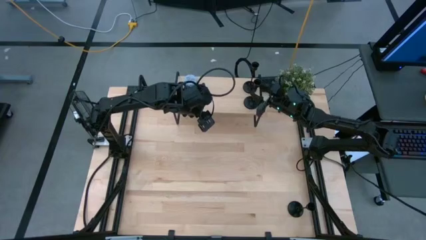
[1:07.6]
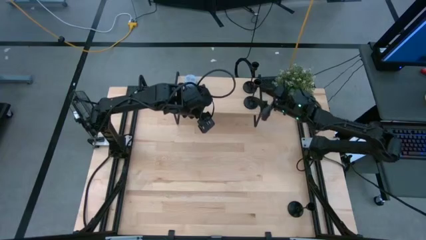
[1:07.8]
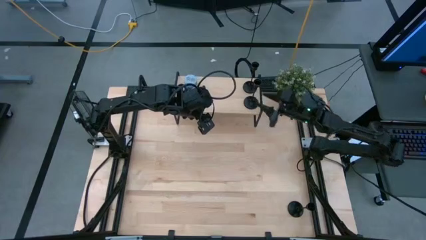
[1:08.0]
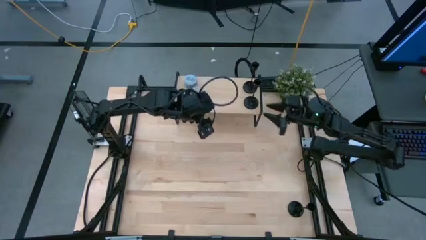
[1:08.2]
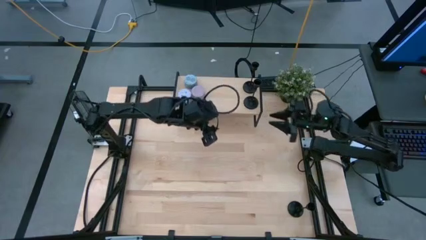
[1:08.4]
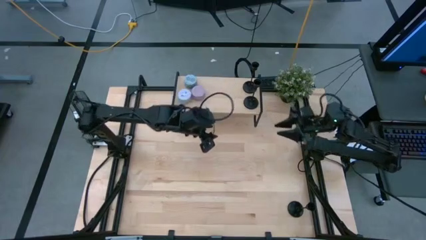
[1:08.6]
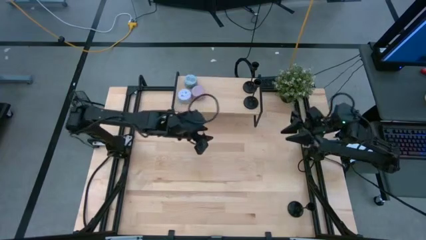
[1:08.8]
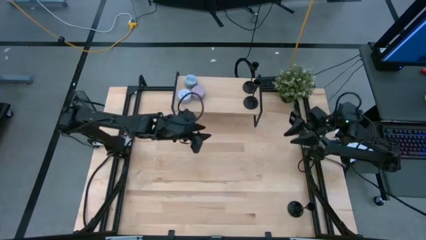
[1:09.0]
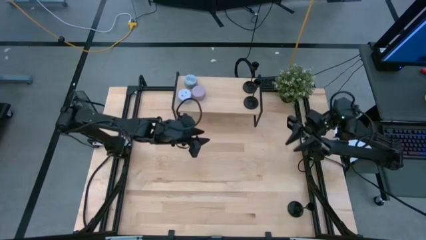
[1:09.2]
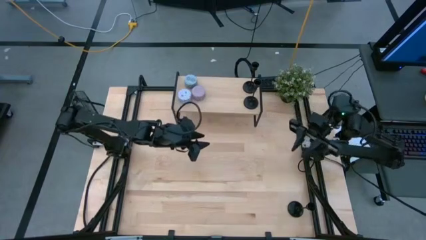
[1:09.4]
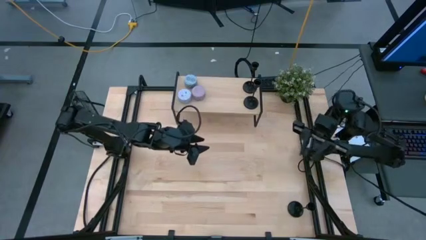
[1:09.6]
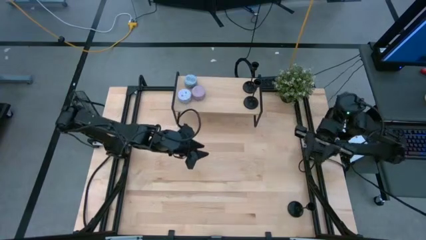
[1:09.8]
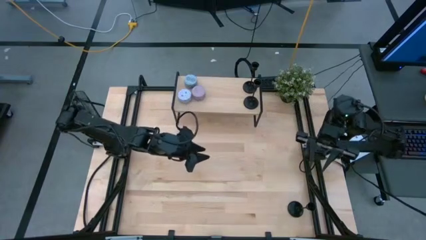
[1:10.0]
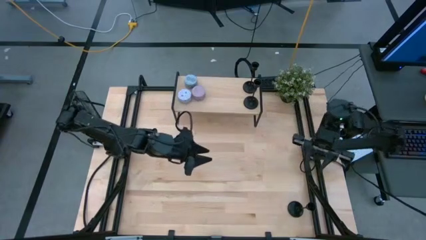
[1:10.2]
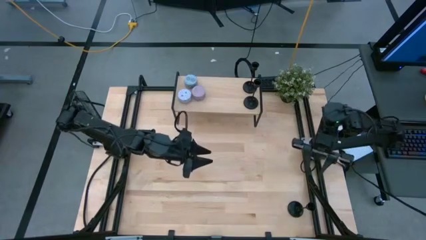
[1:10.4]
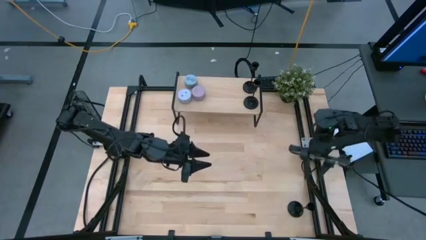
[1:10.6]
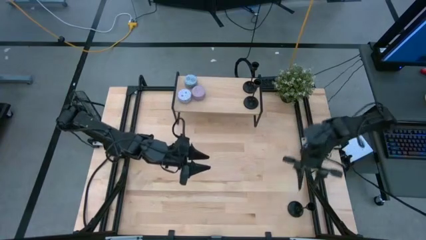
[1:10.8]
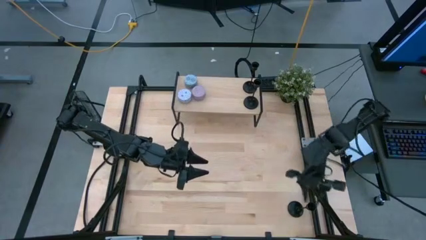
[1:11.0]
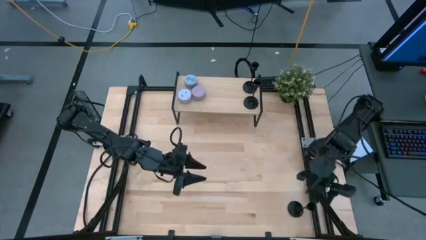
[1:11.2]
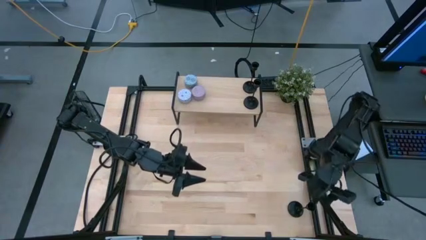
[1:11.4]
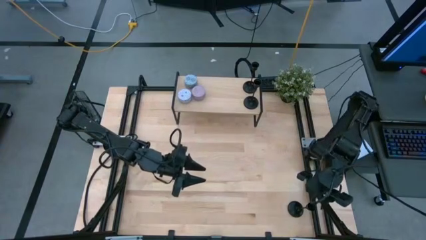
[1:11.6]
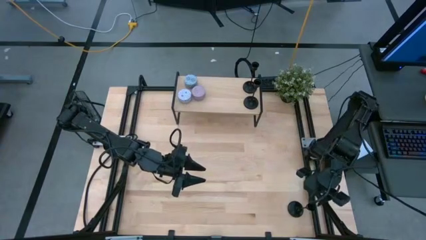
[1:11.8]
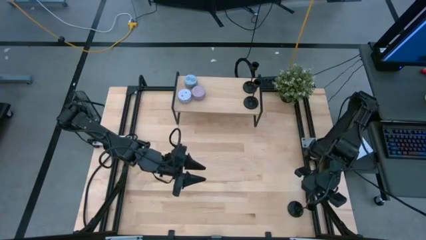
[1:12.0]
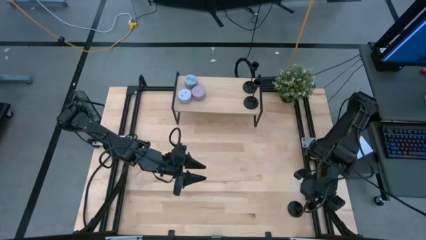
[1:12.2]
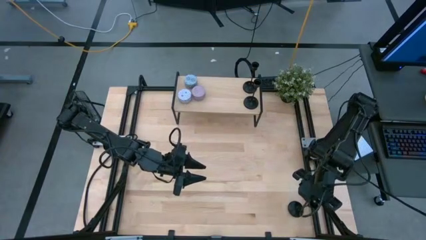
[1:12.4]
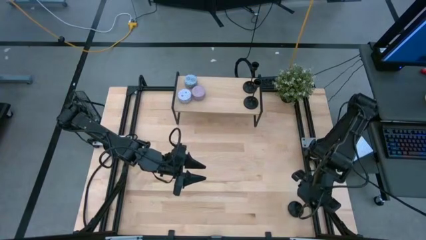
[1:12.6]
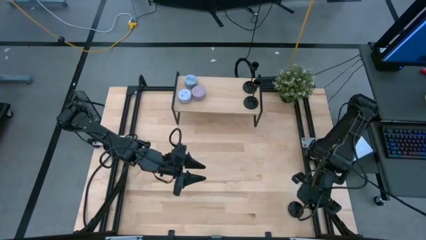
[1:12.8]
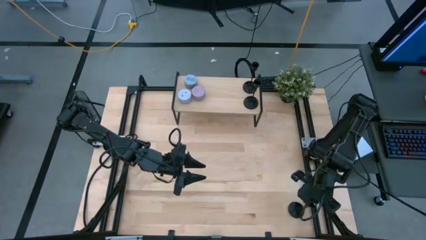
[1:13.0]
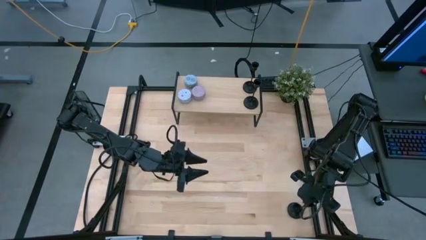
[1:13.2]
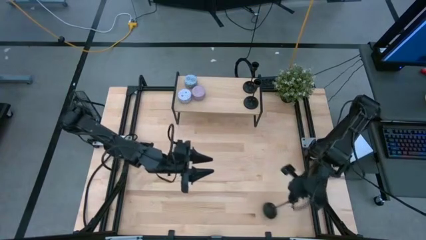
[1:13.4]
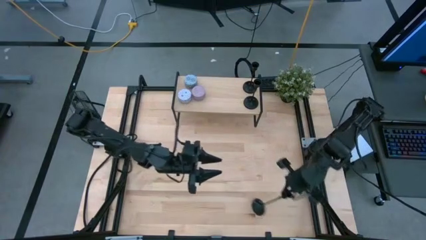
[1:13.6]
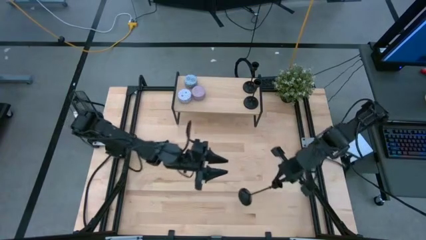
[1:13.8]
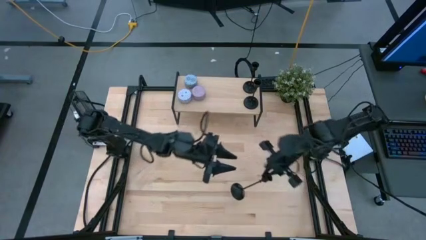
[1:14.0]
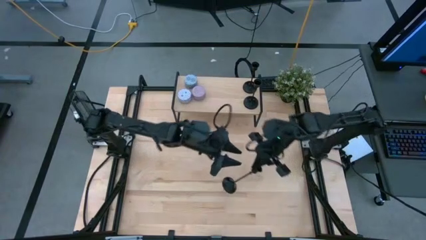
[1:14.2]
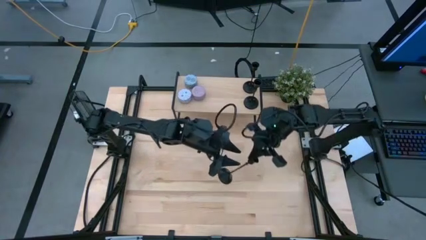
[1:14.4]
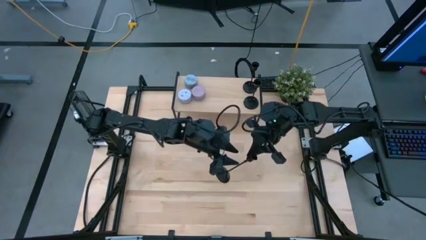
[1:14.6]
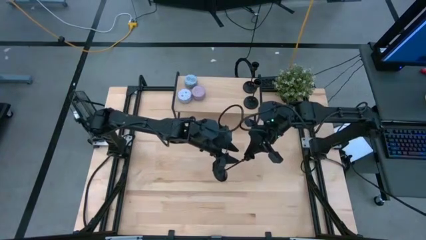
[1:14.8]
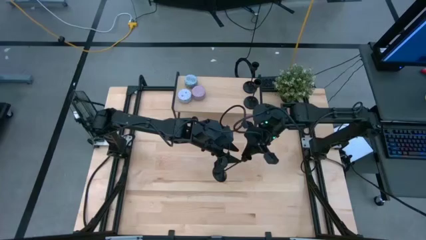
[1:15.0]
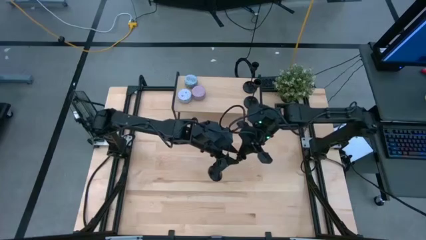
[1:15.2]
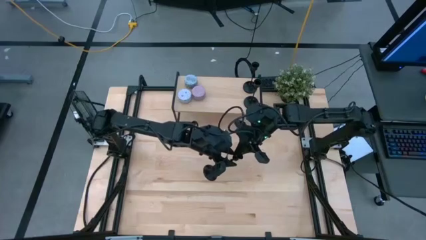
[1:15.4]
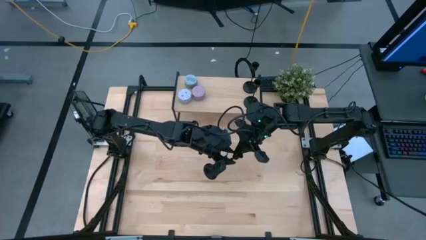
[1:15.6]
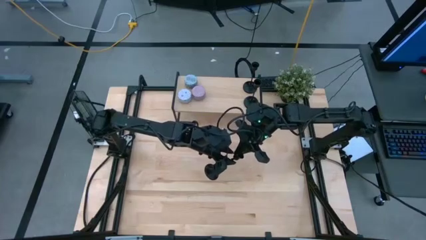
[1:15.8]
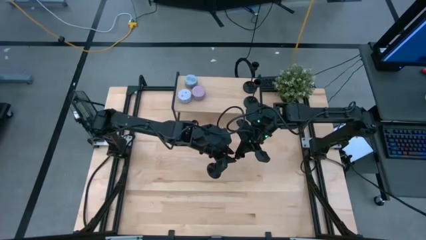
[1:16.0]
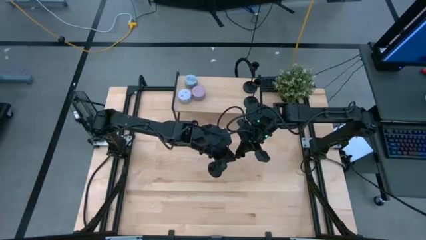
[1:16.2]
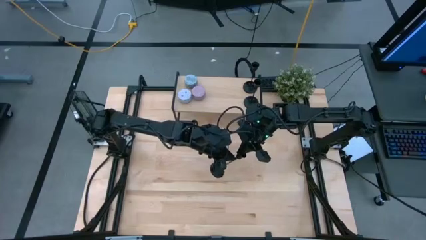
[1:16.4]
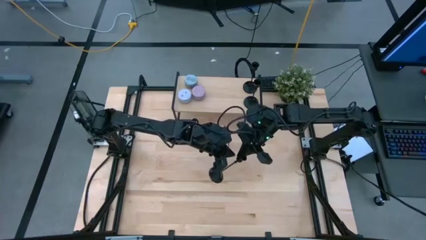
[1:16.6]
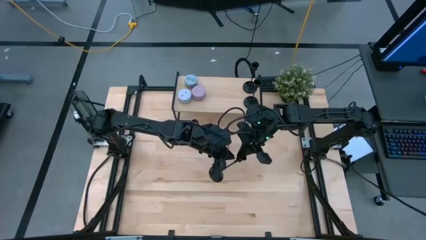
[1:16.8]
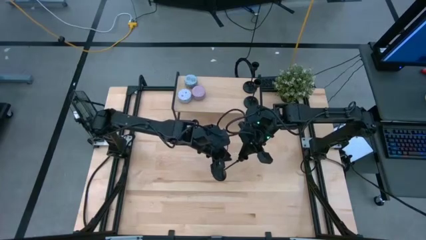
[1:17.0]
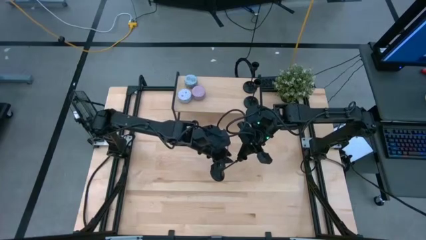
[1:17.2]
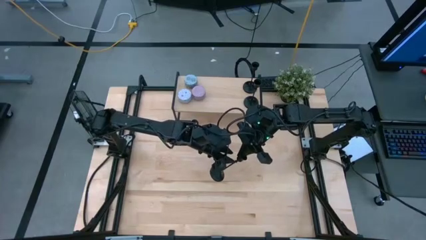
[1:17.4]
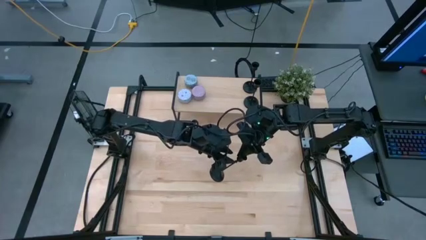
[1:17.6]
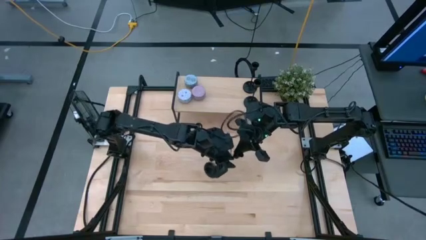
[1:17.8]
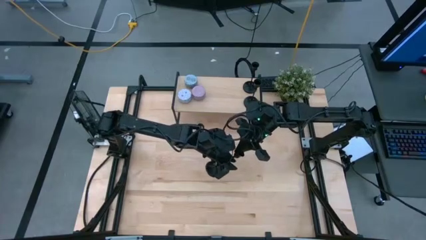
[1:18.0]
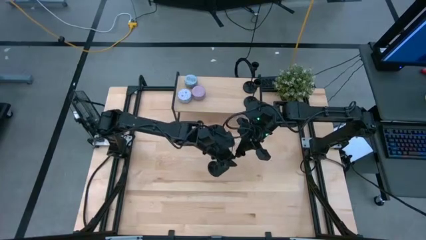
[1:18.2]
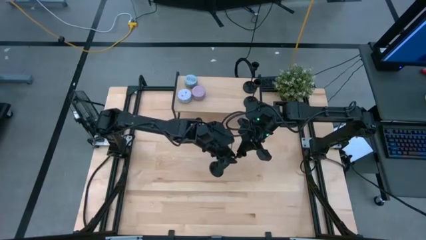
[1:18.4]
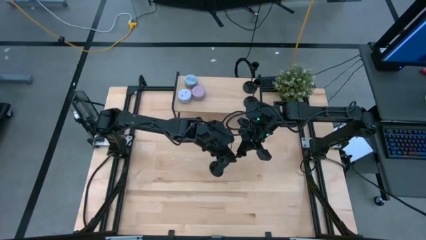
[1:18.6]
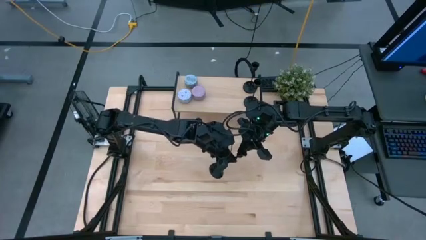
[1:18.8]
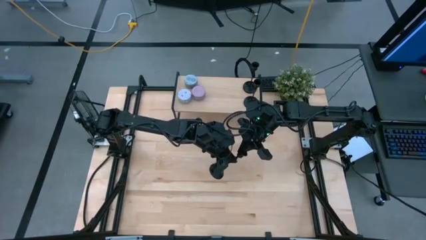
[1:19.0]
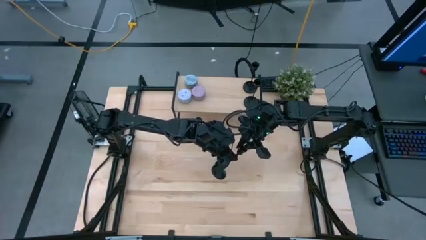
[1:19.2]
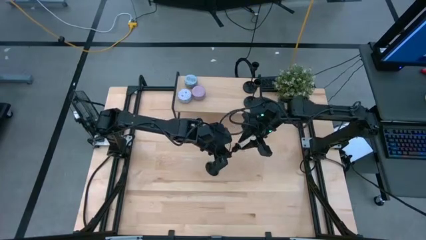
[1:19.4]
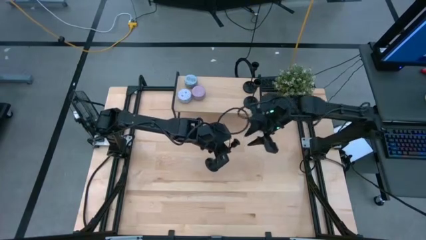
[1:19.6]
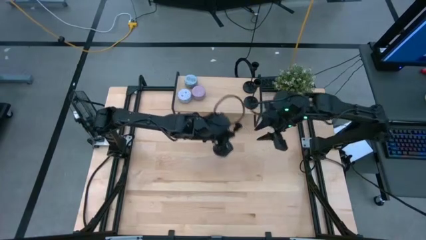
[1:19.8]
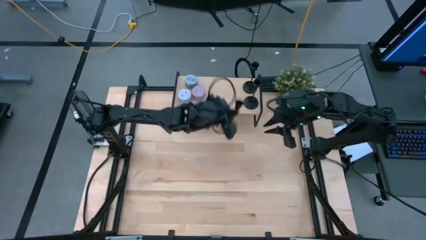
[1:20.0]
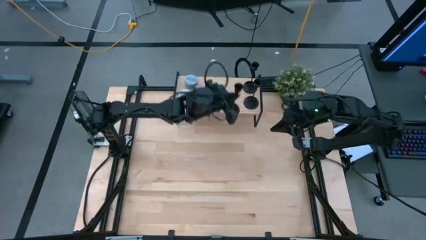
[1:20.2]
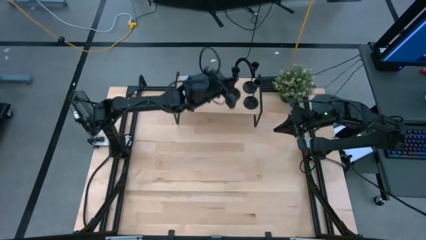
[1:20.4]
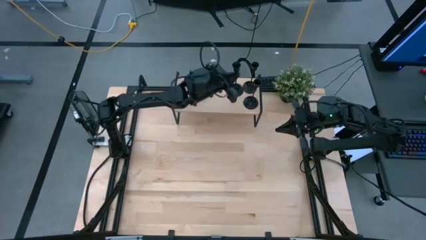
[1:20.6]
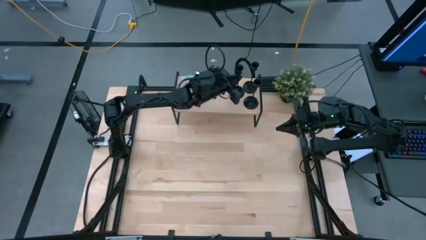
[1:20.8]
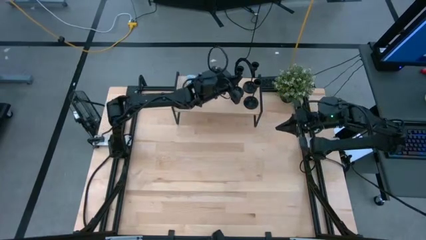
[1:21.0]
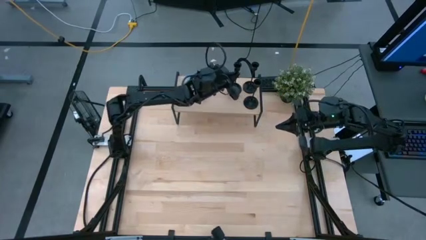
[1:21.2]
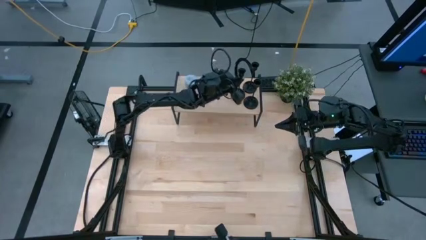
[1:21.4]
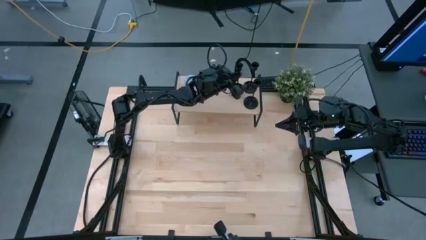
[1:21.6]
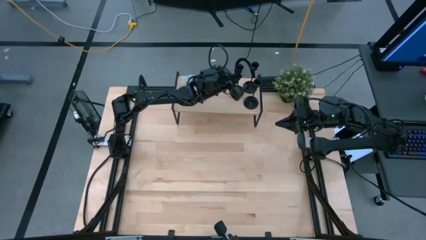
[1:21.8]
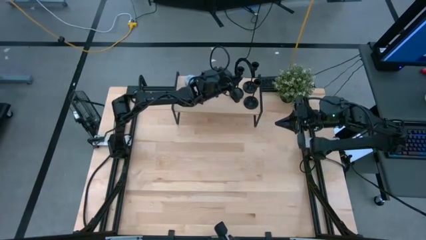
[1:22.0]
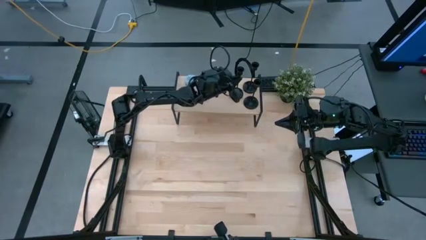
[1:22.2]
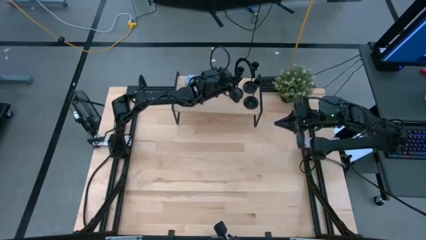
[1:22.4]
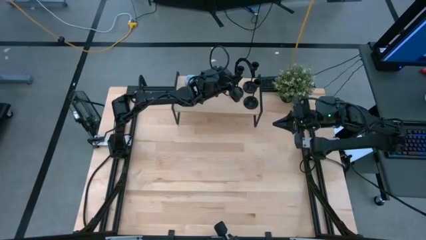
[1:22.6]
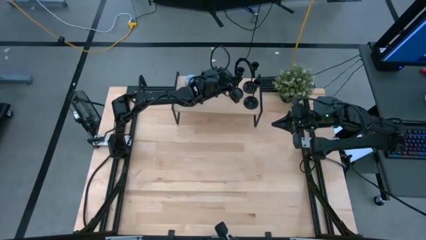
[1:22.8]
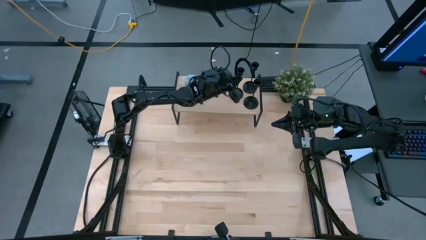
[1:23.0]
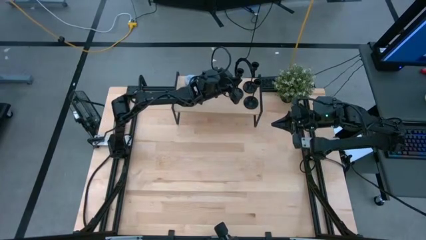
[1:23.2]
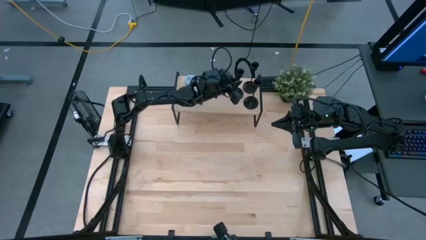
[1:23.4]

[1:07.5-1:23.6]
Task: Pick & Place candle stick holders
Put the black candle holder on the shelf
